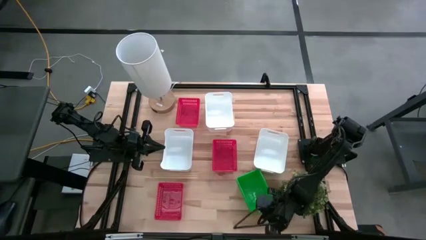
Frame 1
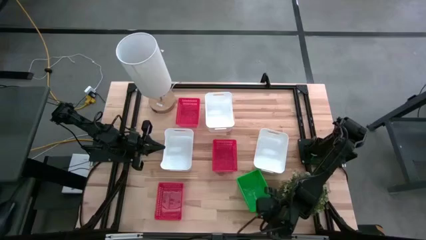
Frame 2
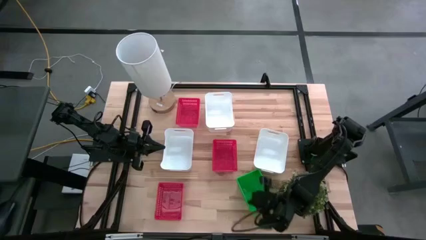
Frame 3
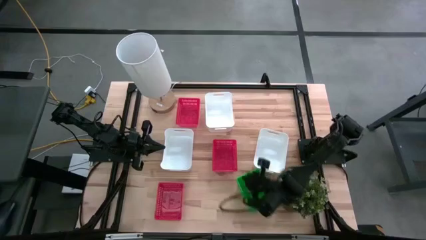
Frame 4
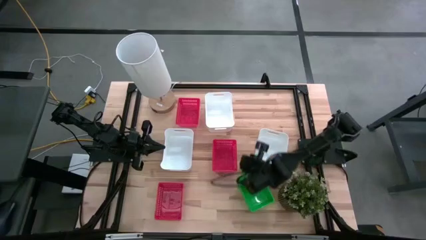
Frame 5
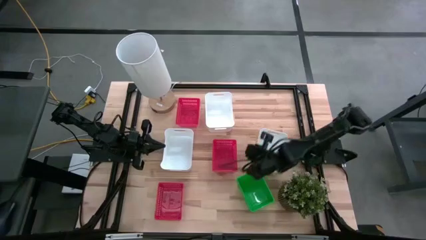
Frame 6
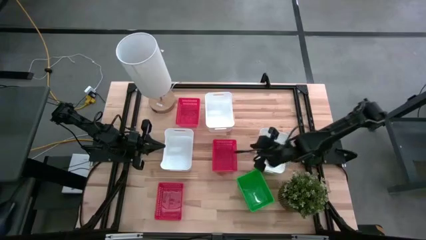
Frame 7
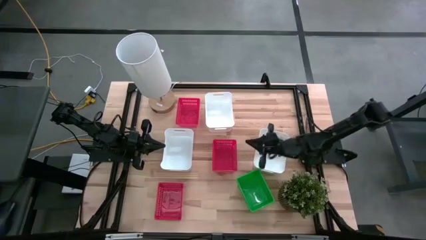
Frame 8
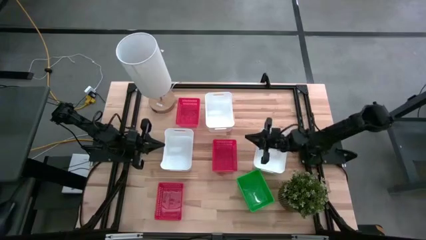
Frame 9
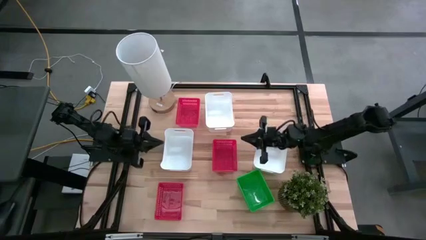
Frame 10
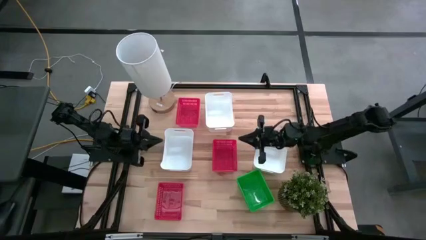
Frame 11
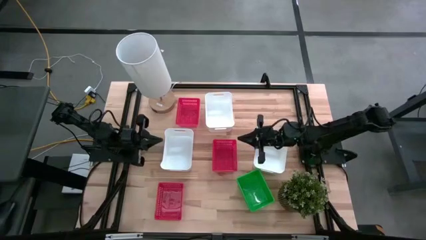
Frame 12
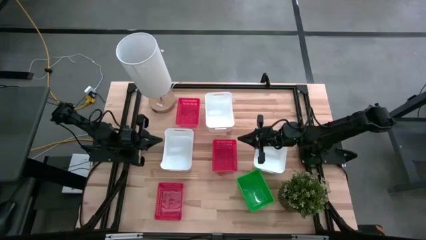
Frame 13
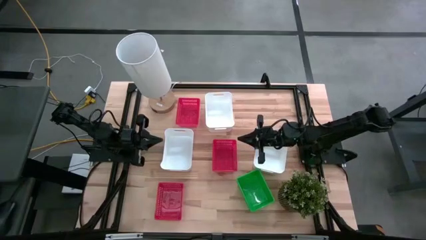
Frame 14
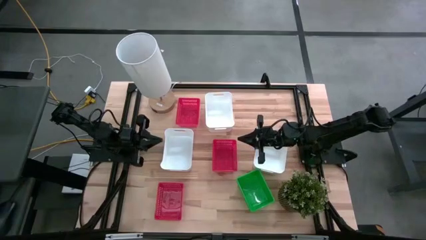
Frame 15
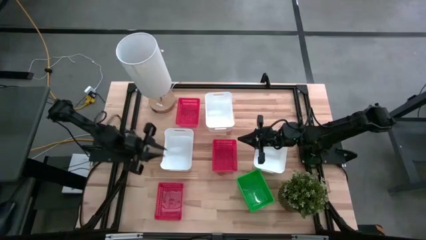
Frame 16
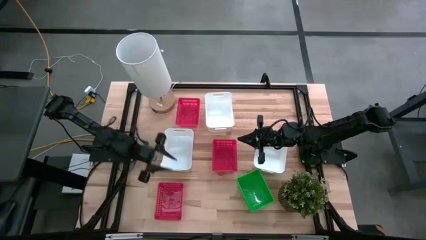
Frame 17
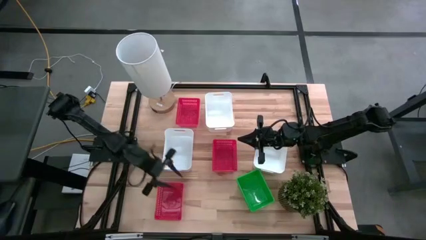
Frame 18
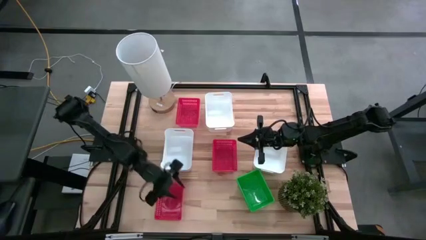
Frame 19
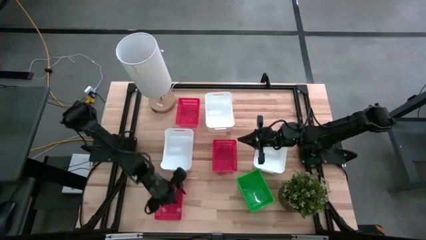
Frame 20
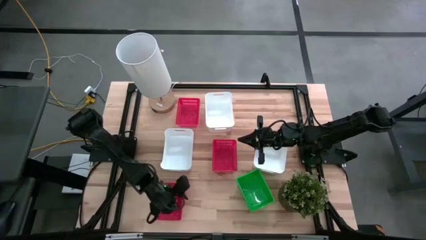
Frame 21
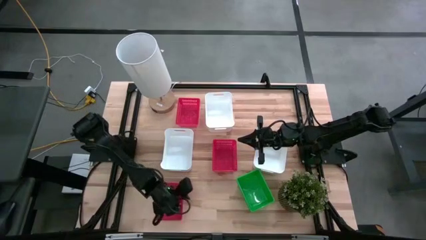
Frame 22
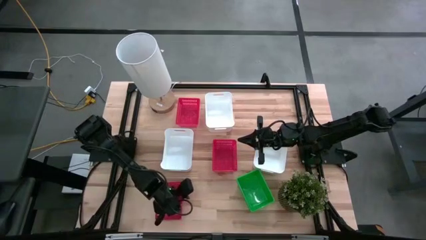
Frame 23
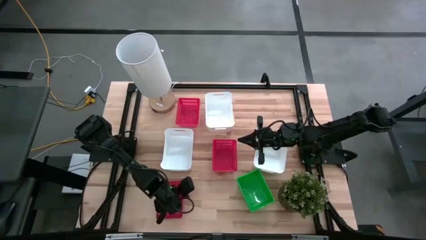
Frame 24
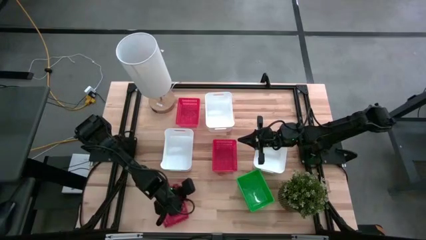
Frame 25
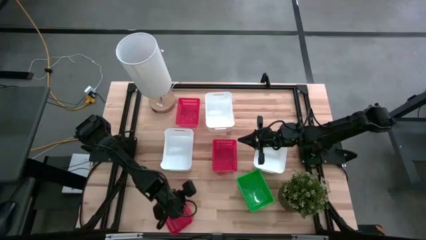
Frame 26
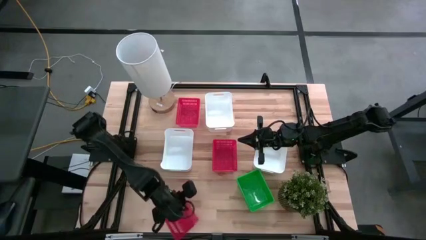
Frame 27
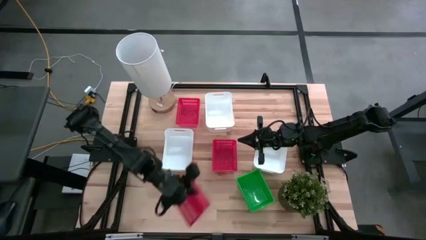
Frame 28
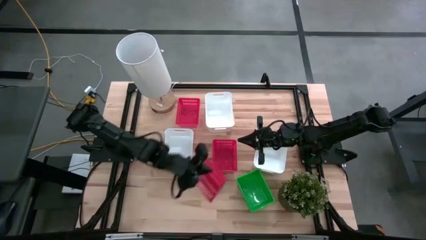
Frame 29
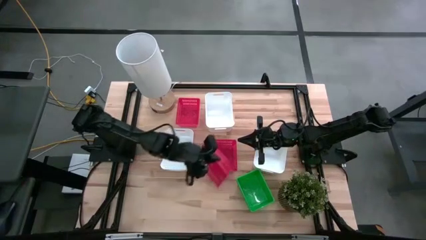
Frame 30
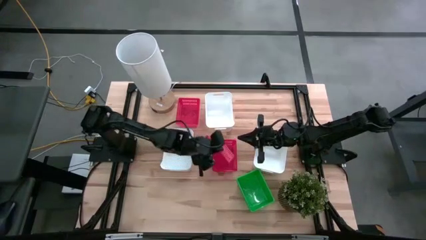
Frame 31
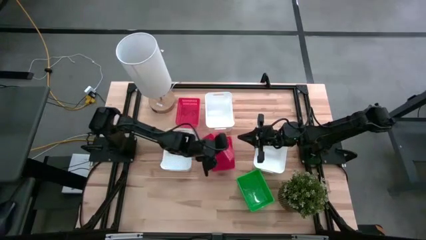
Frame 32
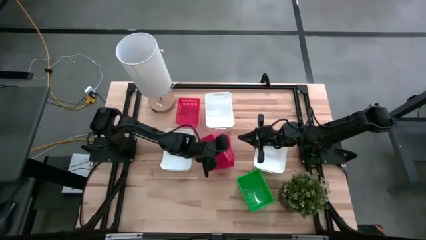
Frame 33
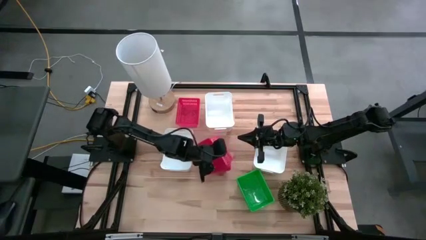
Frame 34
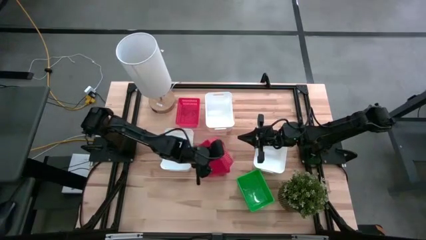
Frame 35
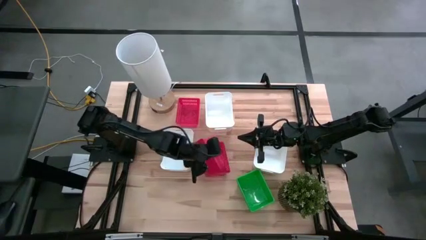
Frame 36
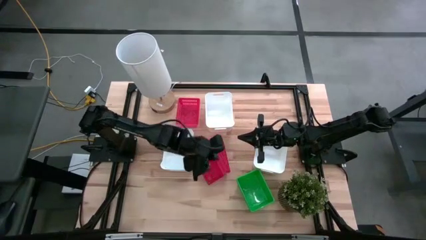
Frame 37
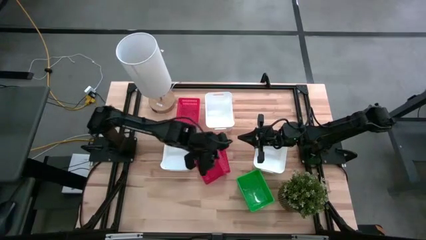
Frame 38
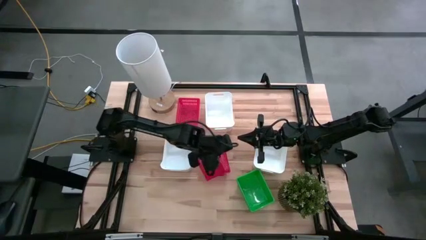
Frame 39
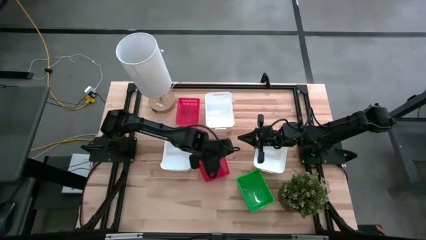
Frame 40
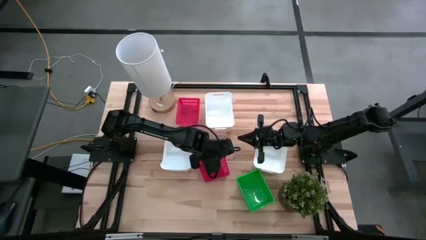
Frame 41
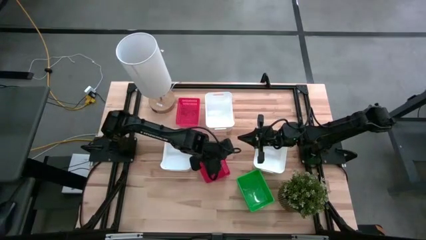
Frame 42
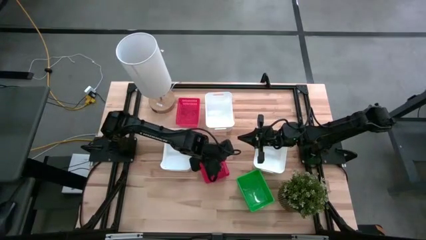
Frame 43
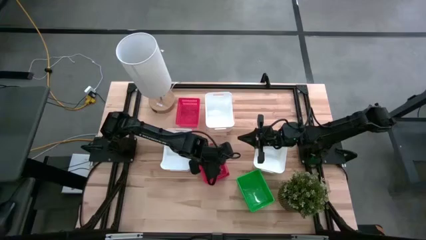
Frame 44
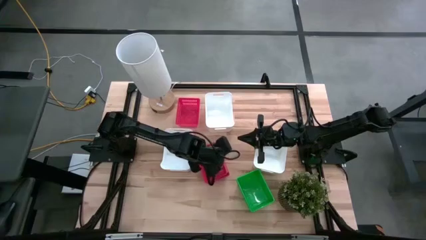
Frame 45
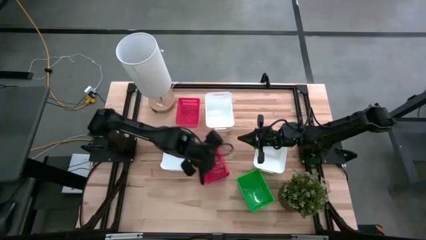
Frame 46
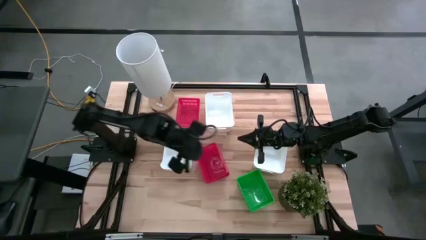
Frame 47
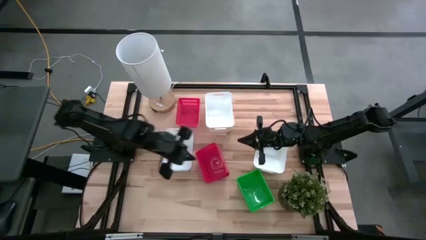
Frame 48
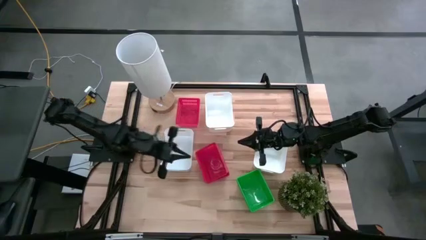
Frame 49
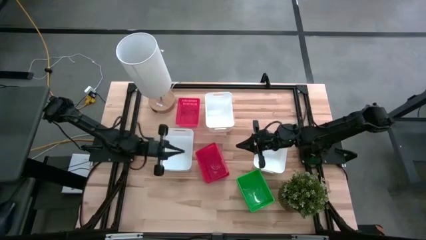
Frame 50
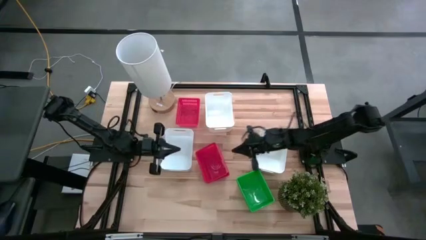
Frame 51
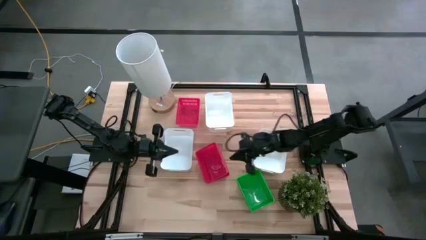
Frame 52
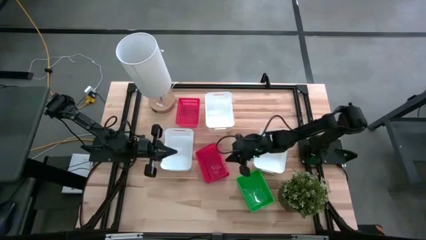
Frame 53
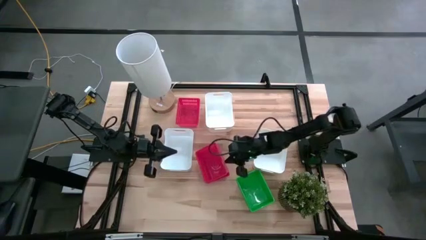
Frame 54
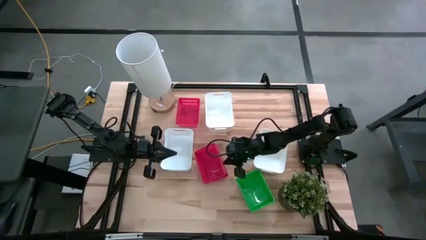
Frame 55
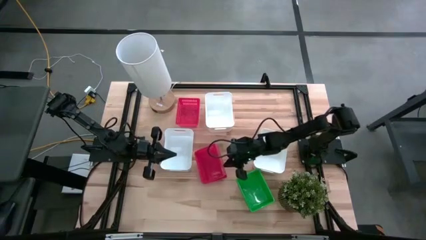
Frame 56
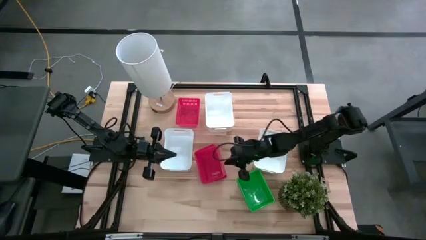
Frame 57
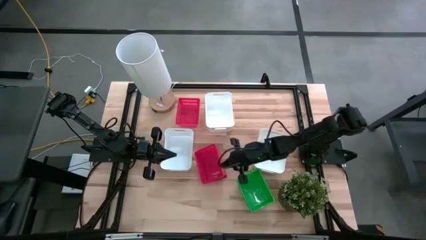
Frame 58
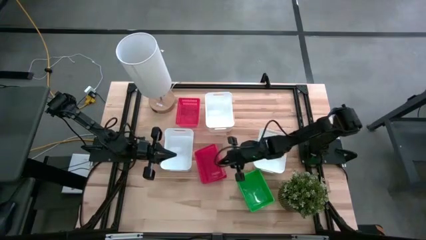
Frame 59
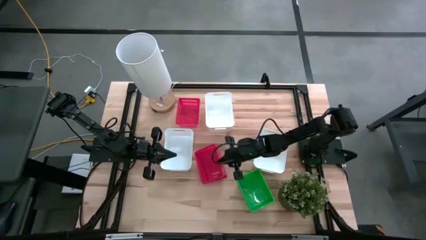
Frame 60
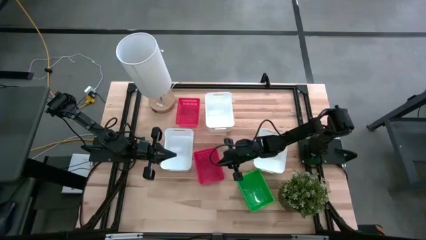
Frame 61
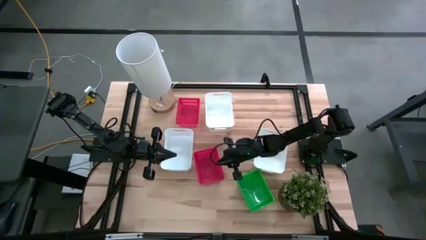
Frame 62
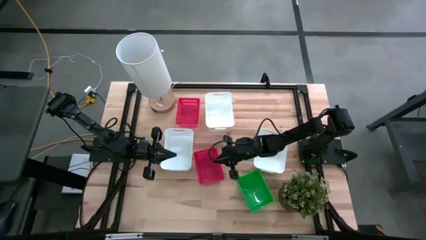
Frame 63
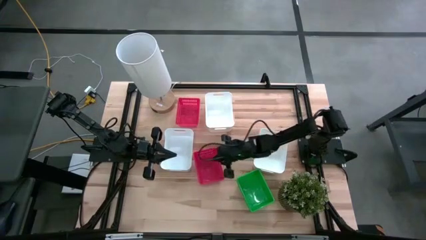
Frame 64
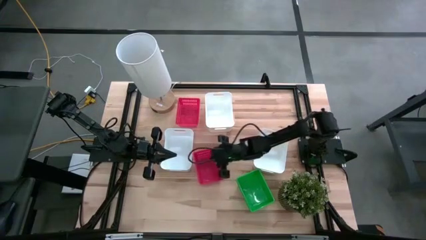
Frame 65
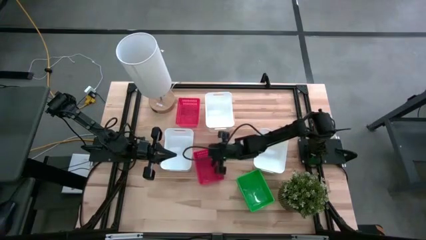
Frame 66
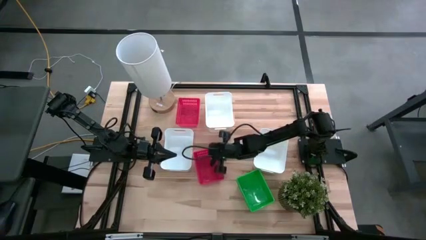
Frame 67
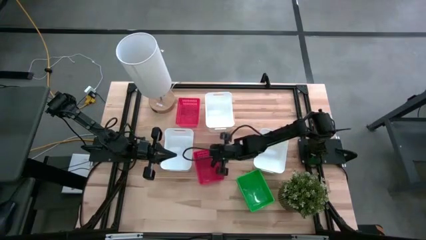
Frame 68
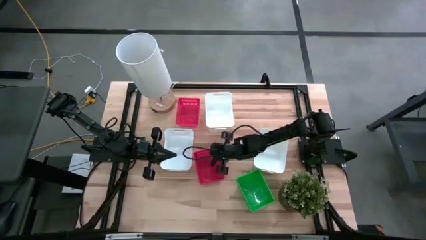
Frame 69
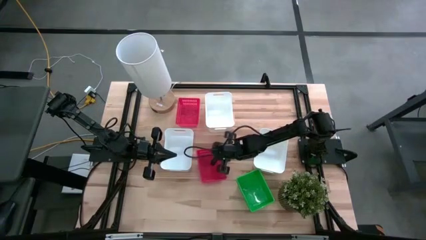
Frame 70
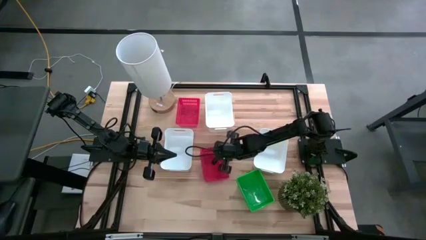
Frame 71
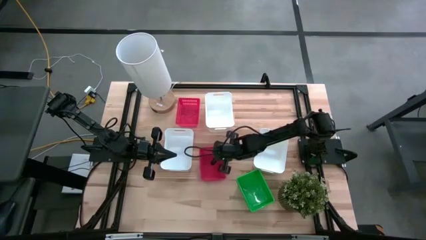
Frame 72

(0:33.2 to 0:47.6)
Stack the bottom red bin on top of the middle red bin
